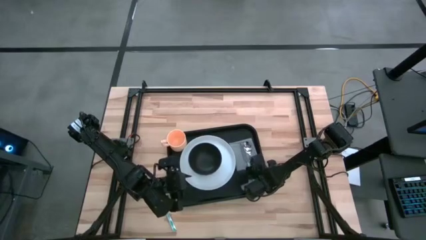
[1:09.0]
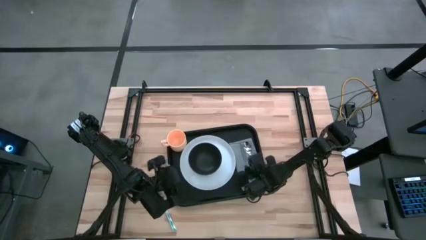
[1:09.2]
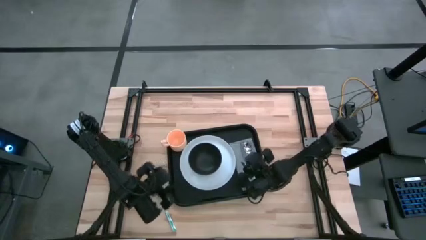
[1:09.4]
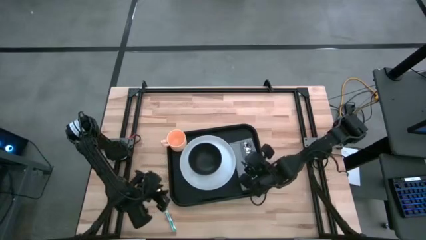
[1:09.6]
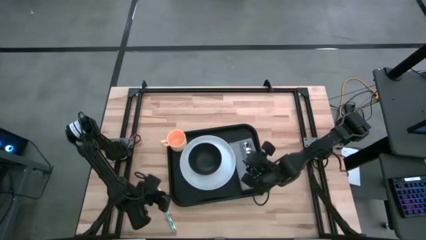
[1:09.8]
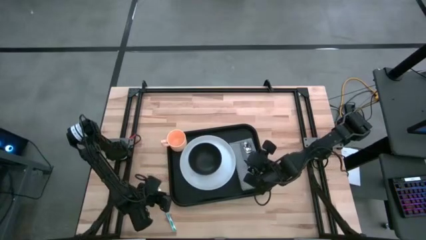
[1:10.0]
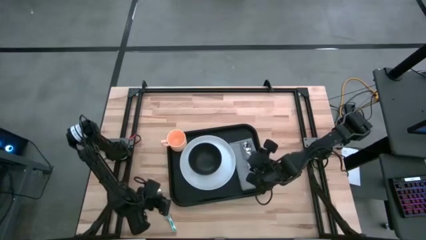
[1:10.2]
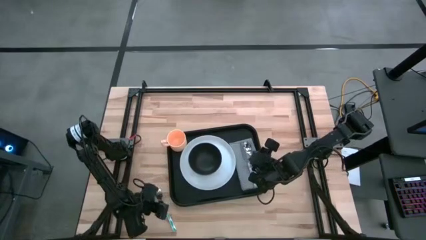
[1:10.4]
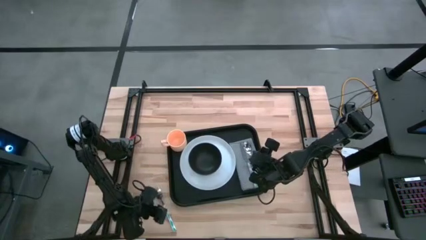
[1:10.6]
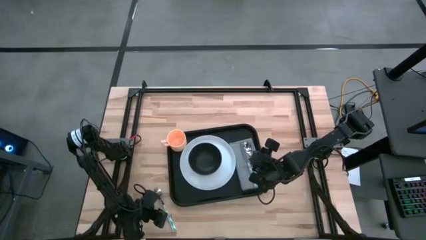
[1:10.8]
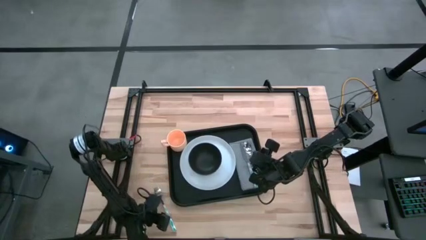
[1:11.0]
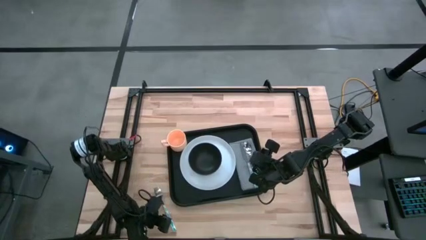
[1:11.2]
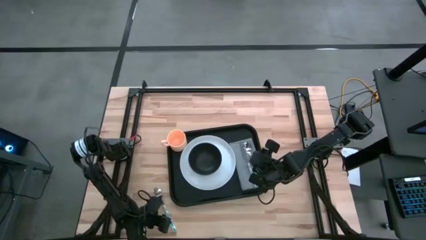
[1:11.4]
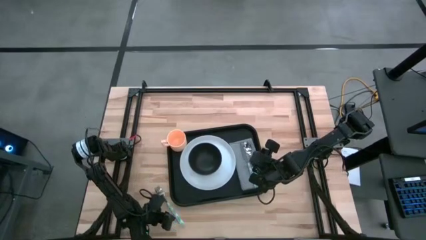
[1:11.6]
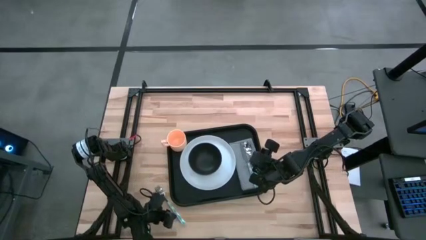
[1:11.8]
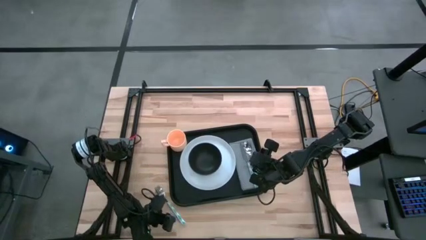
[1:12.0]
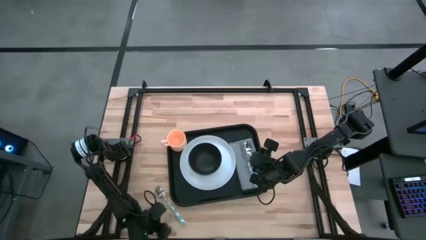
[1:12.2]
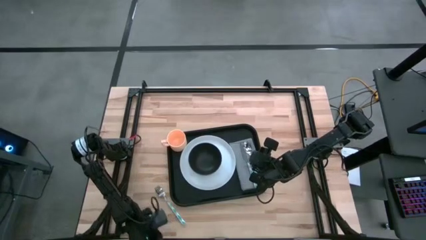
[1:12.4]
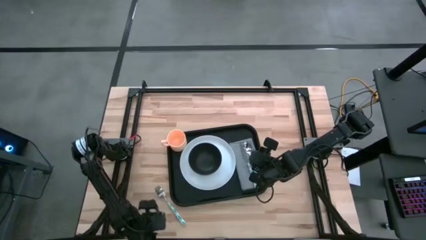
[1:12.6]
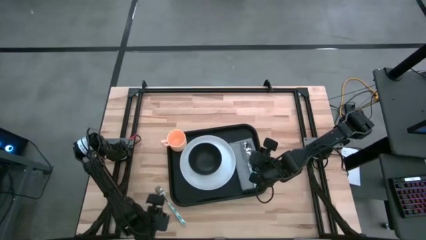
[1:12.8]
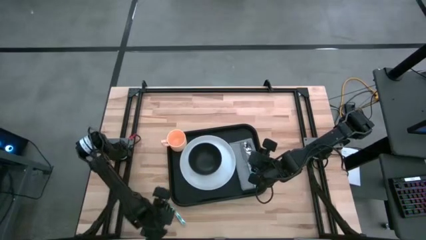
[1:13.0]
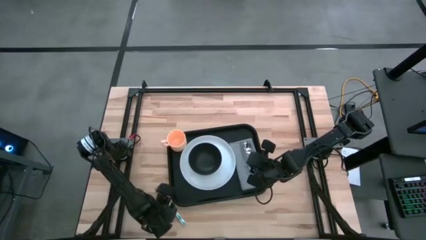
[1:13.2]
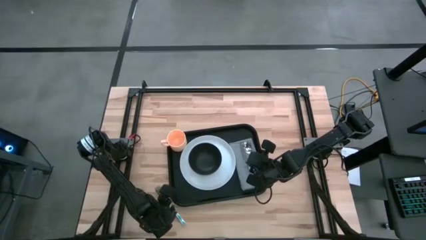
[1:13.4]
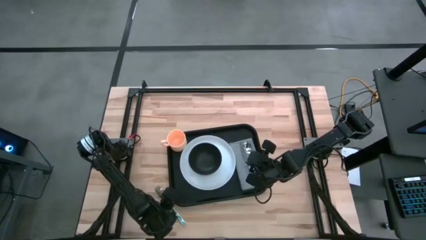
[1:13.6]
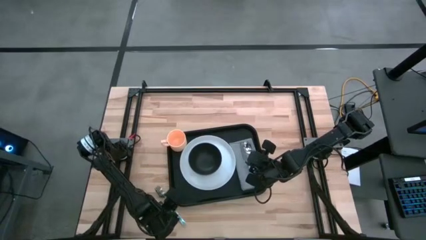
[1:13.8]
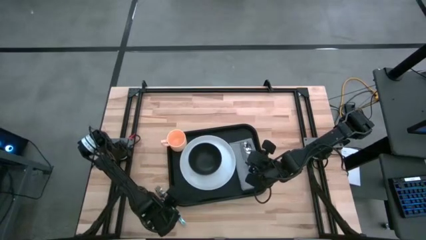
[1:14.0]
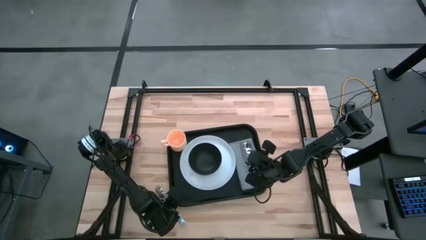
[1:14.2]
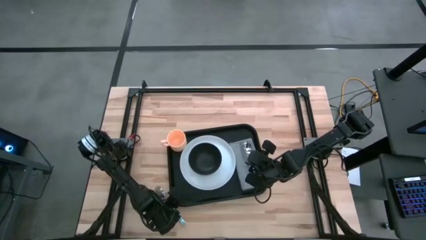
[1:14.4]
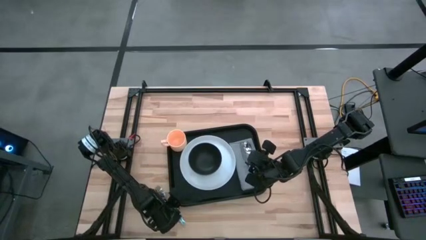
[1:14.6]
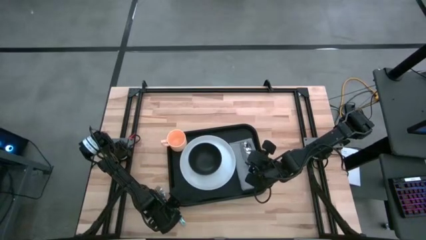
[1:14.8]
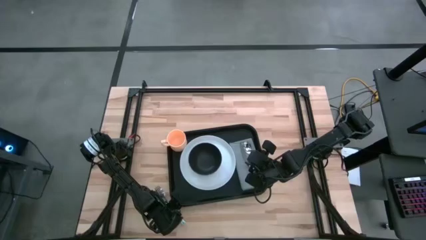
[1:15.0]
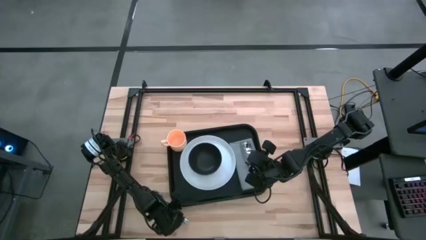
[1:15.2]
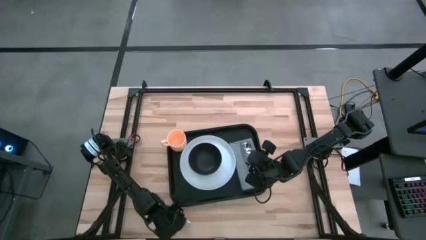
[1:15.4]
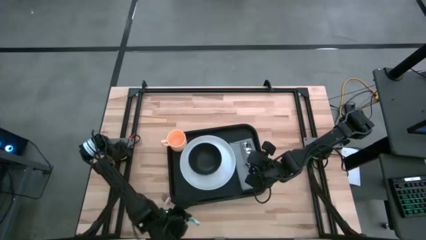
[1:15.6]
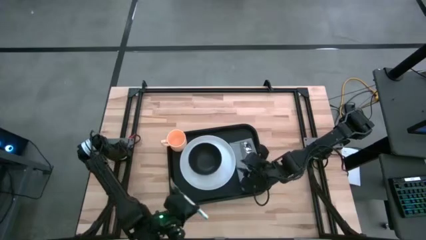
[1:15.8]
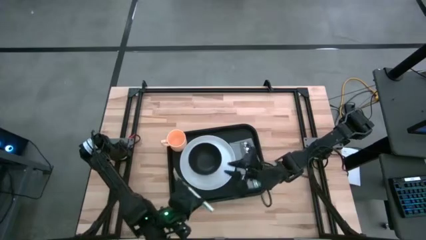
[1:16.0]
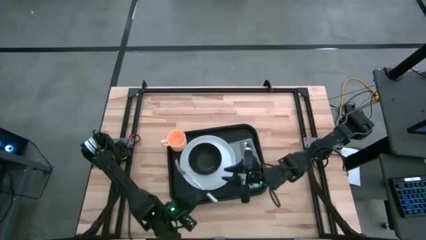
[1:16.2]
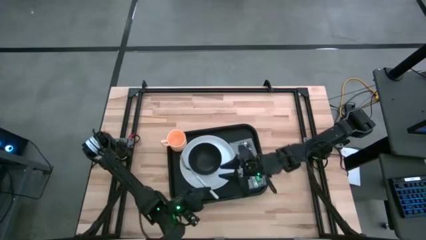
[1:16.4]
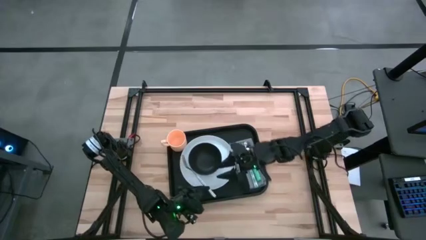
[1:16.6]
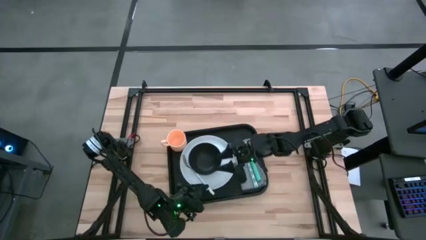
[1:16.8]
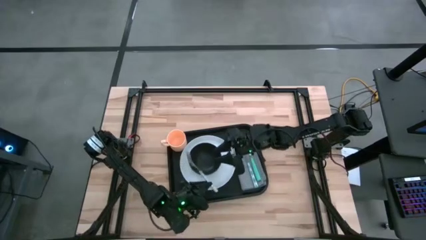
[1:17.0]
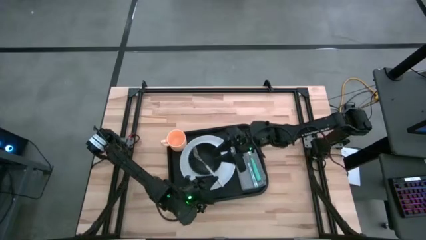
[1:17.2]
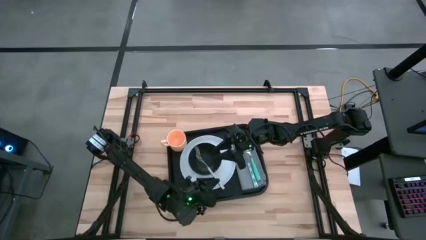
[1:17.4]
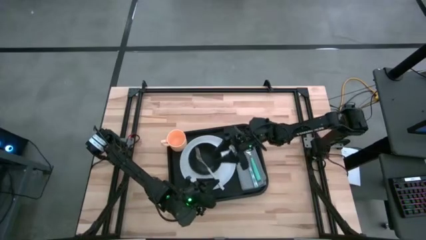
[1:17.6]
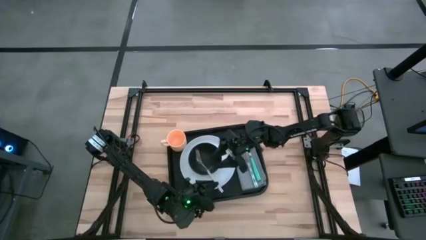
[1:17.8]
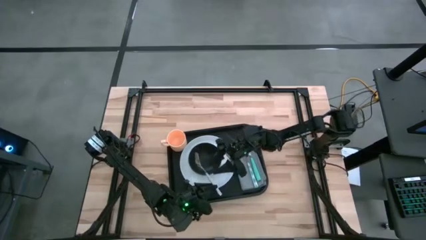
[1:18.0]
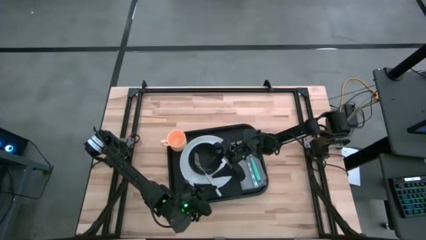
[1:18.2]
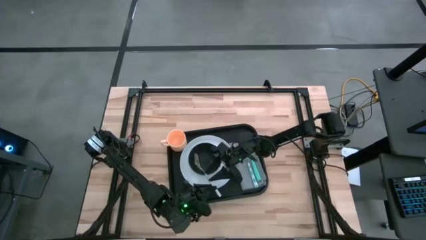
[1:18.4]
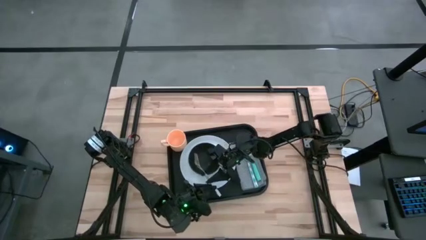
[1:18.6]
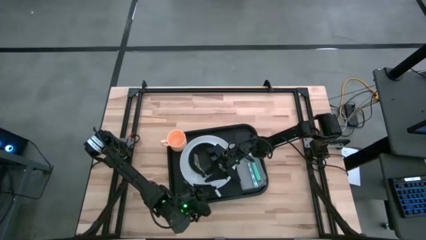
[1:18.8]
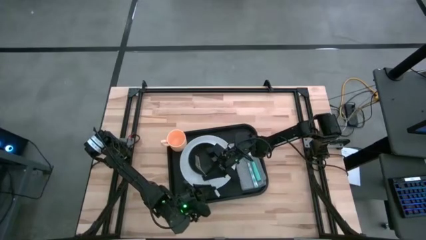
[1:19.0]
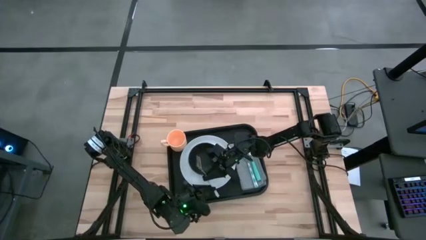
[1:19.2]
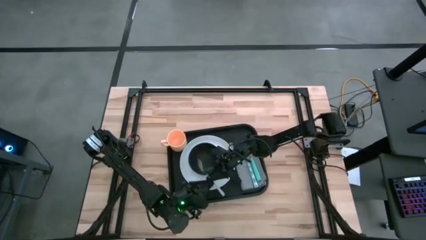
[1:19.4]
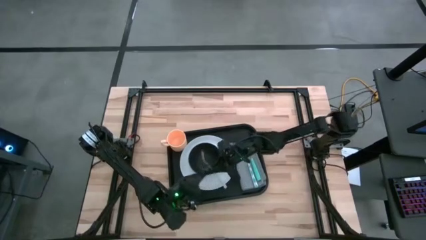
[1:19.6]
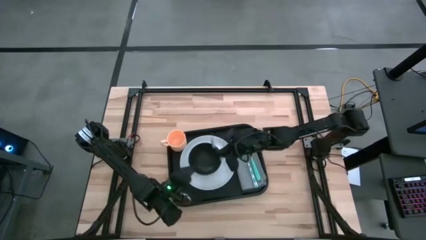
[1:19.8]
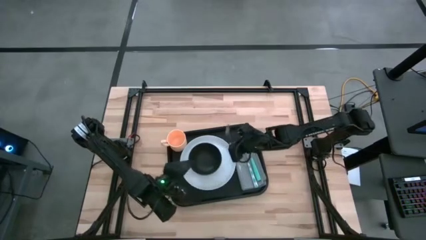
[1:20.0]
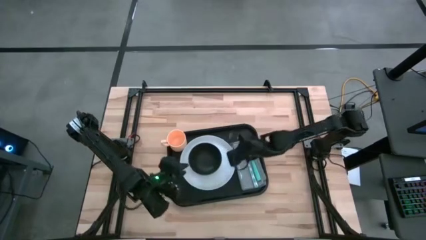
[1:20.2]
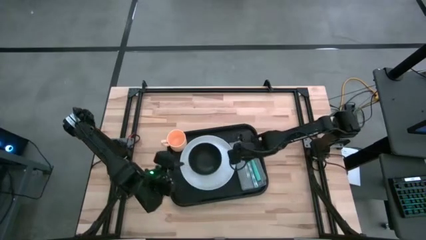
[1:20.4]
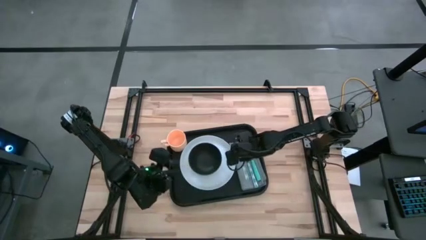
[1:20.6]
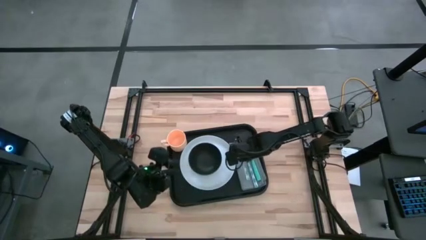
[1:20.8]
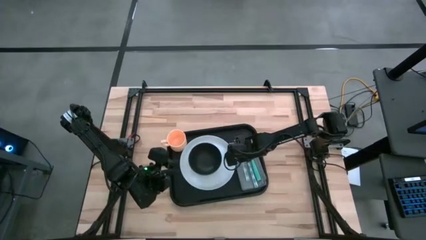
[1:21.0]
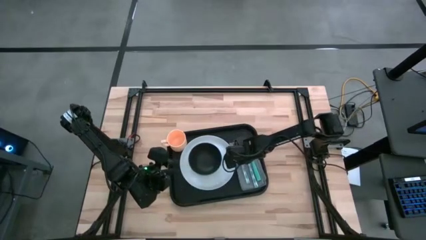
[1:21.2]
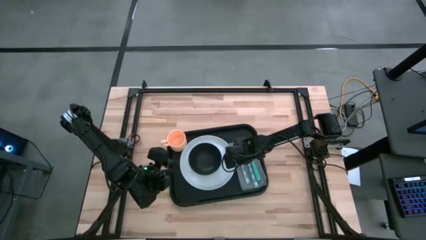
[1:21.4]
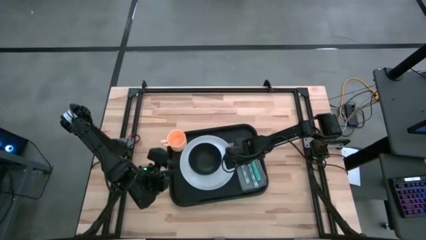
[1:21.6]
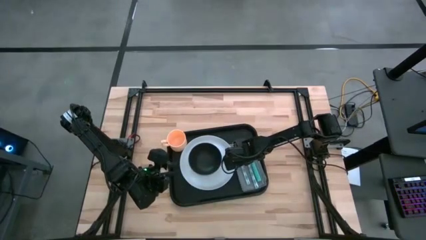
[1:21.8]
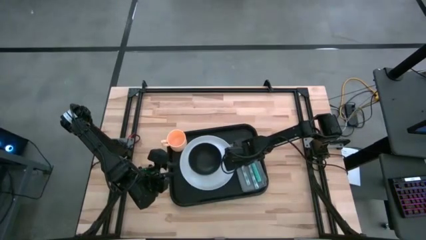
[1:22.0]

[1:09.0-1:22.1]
Task: Set up tray
Put the white patterned fork beside the white patterned knife on the gray napkin on the black serving tray

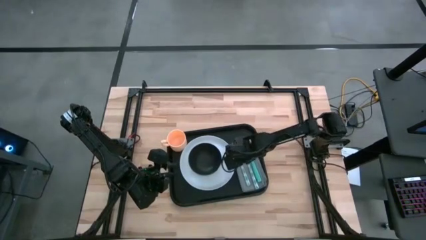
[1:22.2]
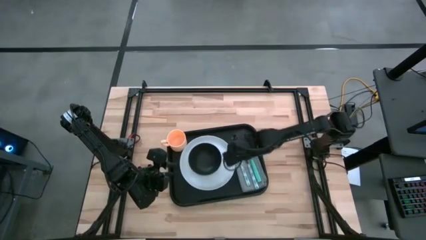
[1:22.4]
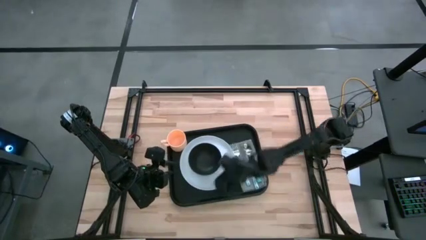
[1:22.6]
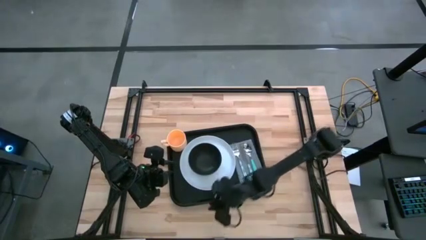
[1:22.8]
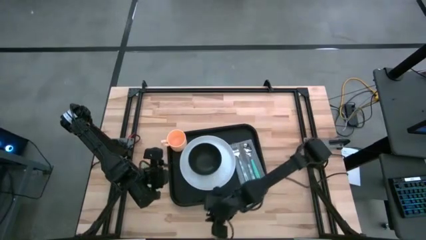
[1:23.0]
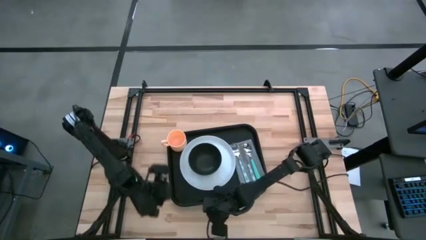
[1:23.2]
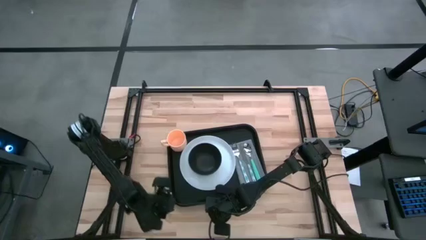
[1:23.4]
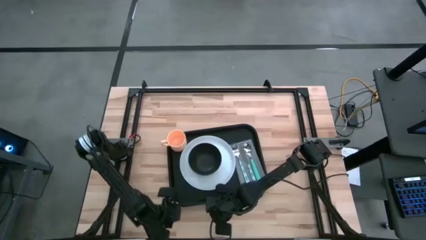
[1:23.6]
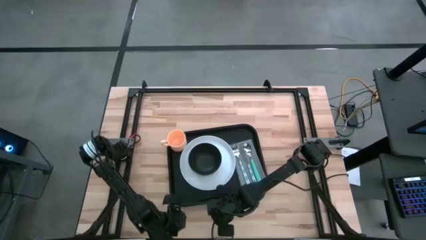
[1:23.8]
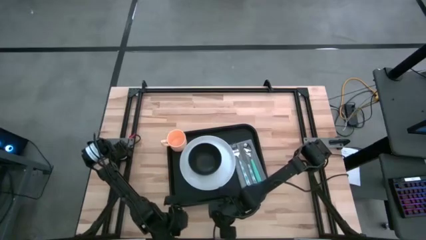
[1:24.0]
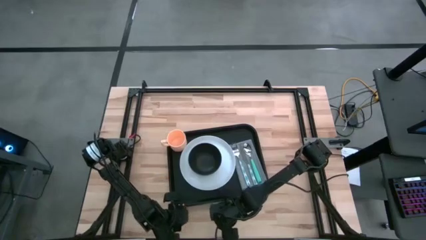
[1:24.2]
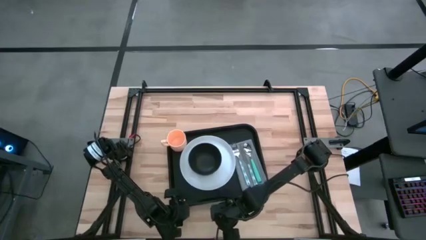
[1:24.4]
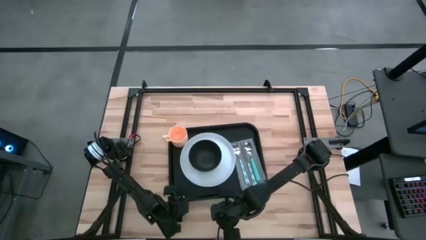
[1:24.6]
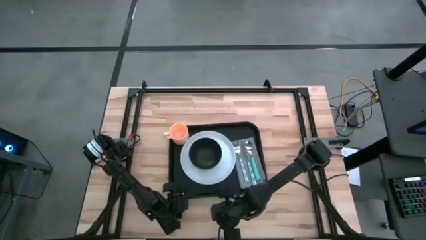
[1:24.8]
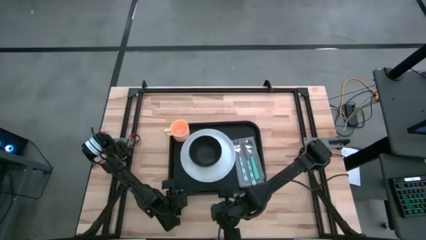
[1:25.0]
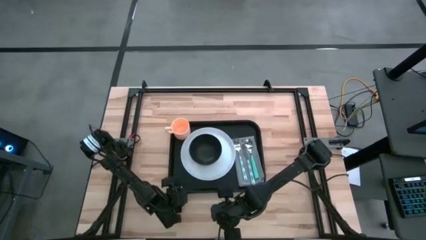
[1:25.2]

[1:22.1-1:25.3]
Adjust the black serving tray
